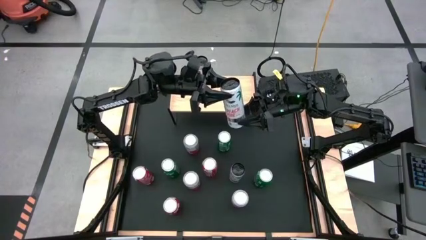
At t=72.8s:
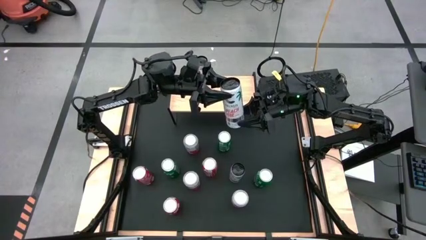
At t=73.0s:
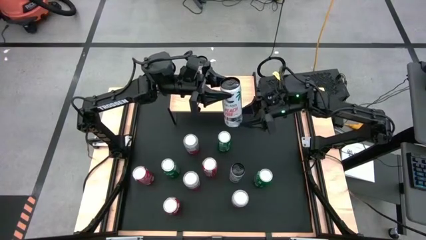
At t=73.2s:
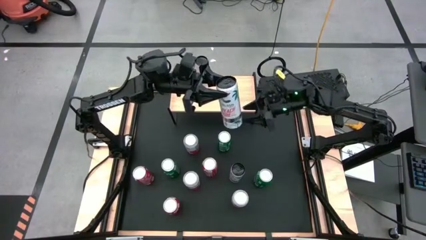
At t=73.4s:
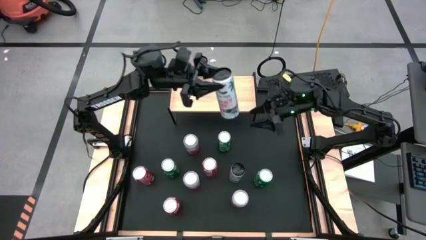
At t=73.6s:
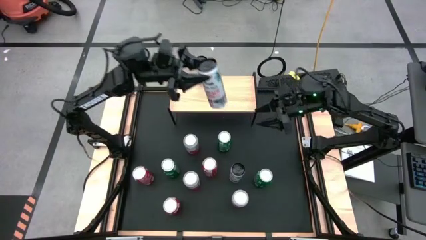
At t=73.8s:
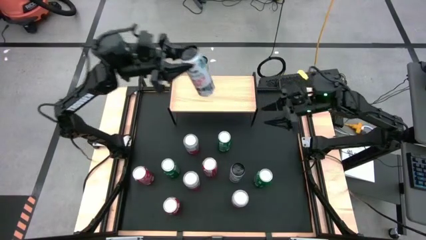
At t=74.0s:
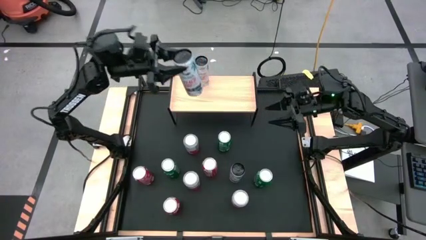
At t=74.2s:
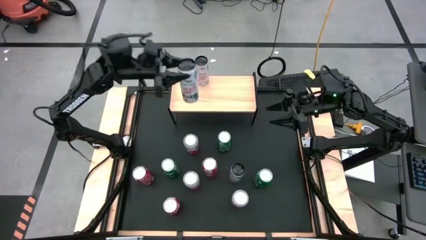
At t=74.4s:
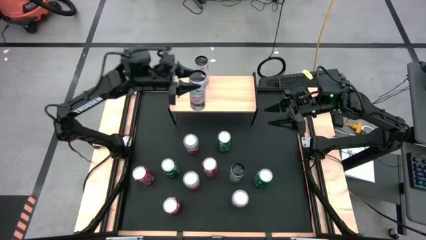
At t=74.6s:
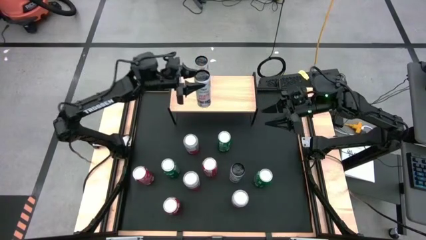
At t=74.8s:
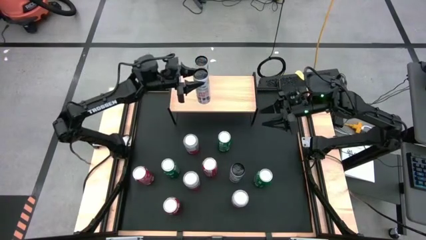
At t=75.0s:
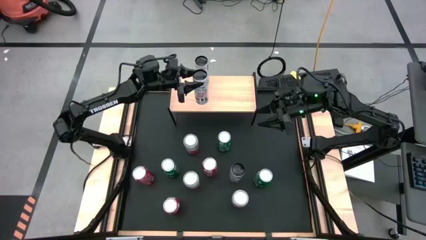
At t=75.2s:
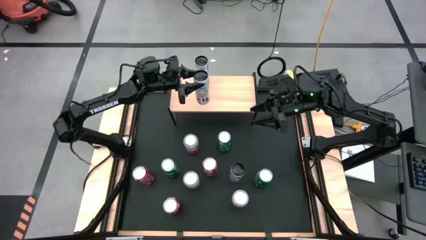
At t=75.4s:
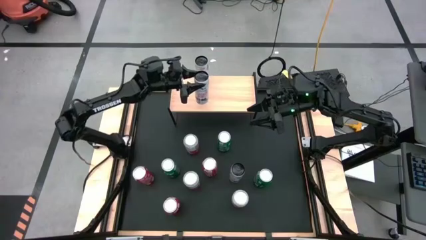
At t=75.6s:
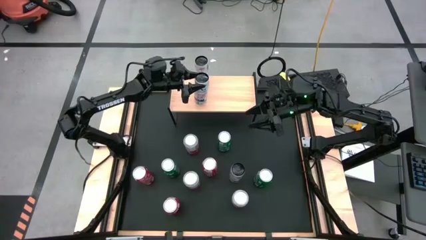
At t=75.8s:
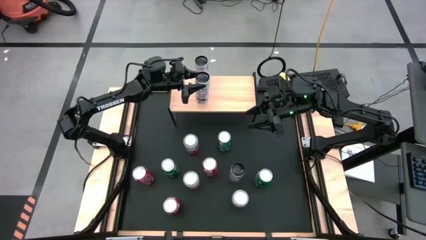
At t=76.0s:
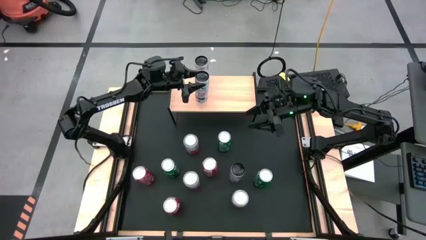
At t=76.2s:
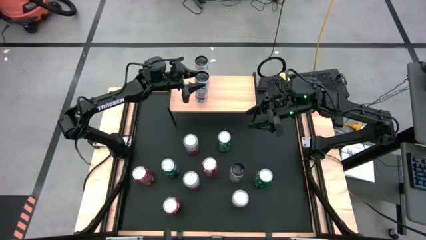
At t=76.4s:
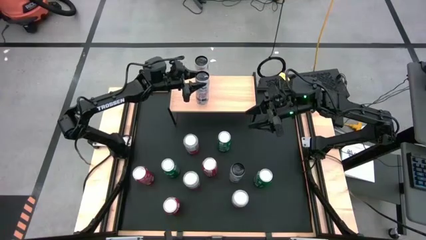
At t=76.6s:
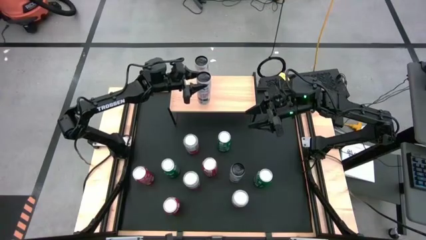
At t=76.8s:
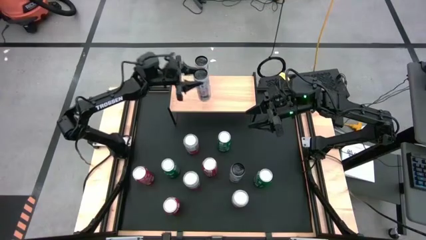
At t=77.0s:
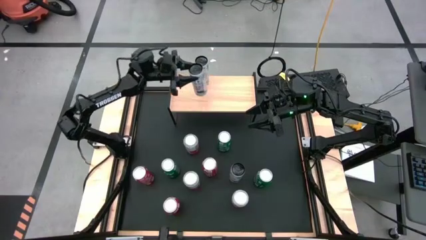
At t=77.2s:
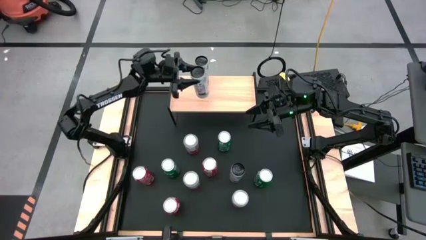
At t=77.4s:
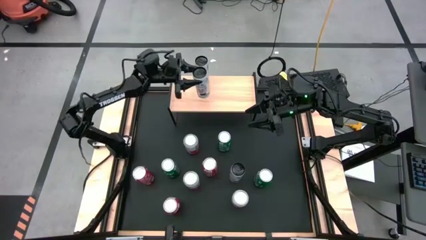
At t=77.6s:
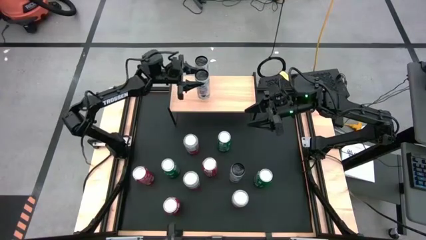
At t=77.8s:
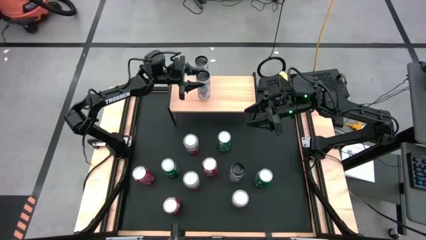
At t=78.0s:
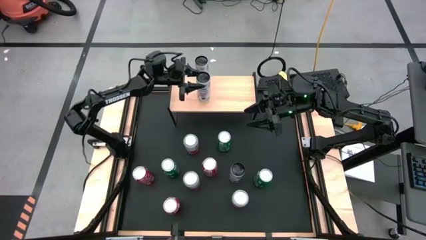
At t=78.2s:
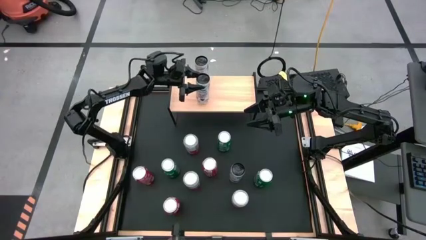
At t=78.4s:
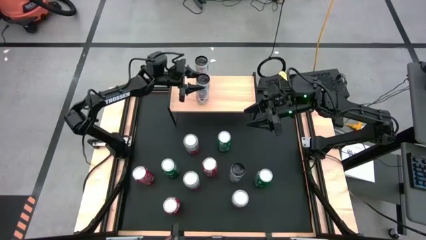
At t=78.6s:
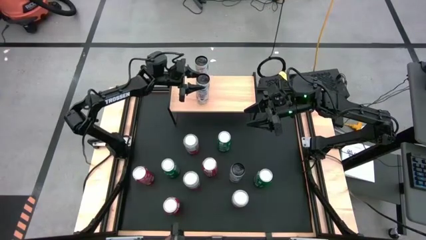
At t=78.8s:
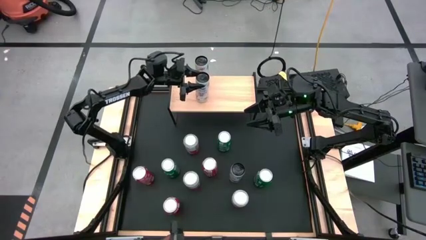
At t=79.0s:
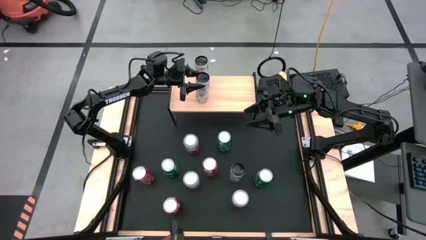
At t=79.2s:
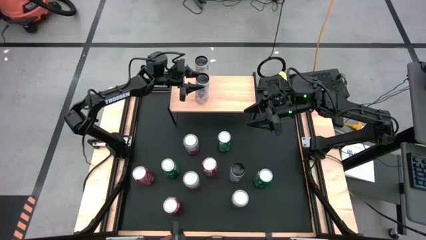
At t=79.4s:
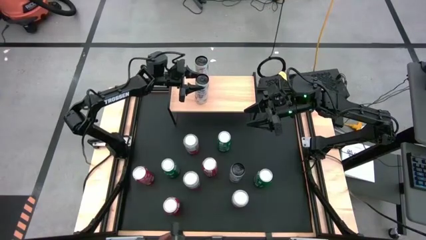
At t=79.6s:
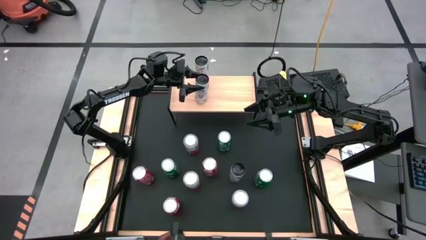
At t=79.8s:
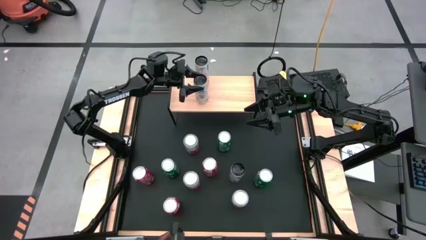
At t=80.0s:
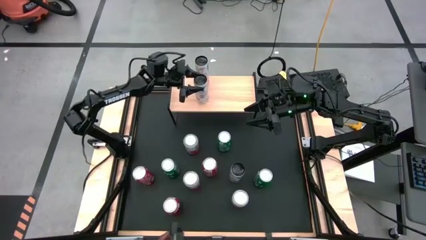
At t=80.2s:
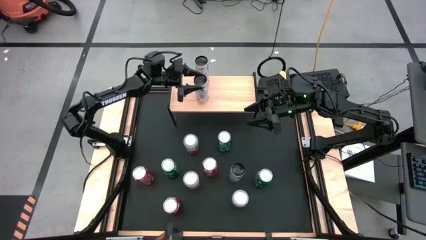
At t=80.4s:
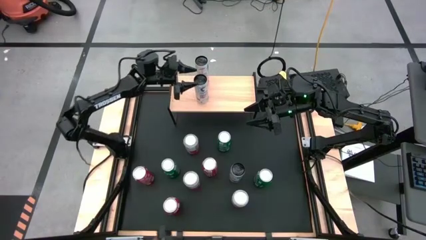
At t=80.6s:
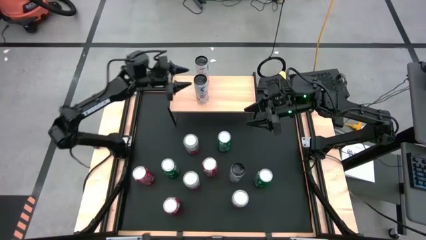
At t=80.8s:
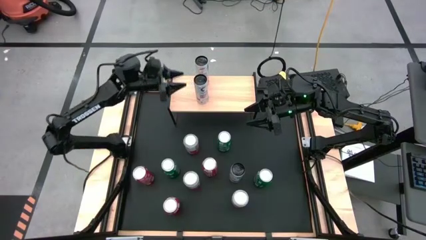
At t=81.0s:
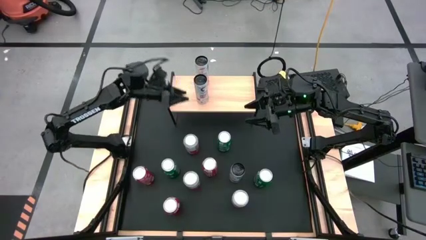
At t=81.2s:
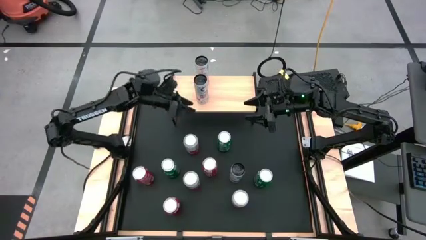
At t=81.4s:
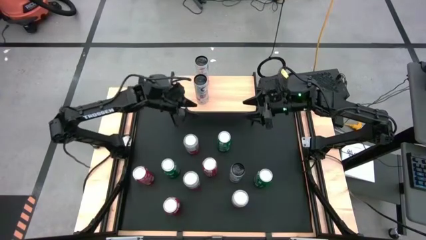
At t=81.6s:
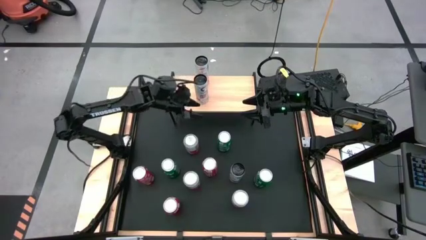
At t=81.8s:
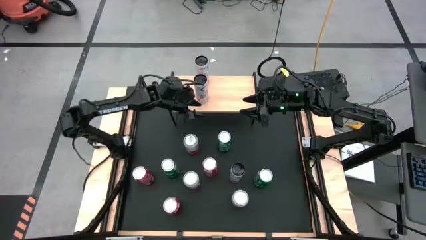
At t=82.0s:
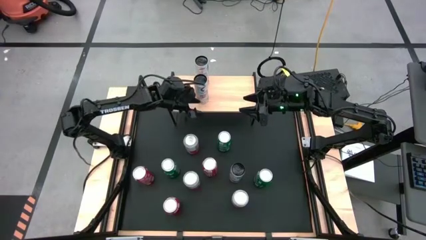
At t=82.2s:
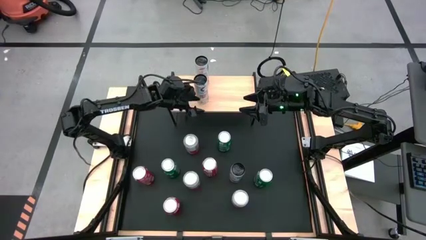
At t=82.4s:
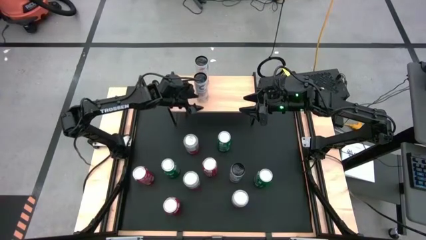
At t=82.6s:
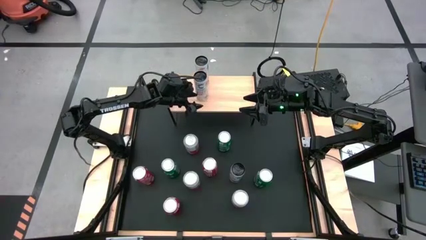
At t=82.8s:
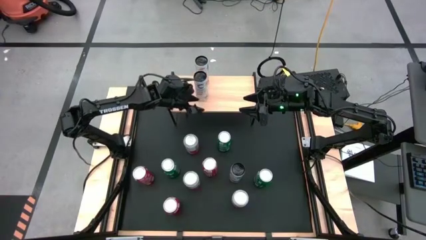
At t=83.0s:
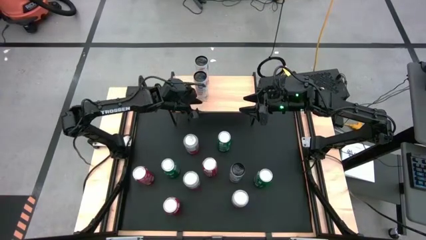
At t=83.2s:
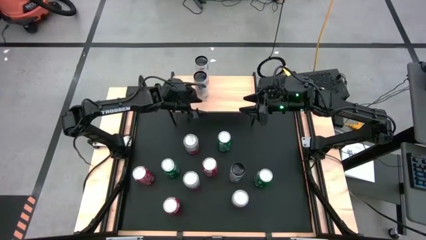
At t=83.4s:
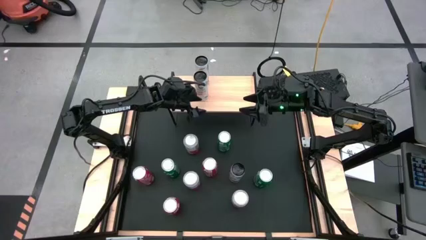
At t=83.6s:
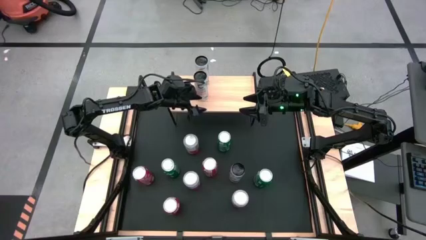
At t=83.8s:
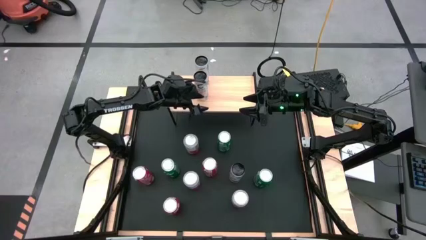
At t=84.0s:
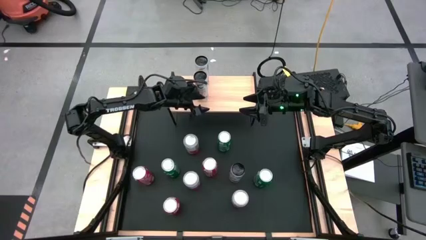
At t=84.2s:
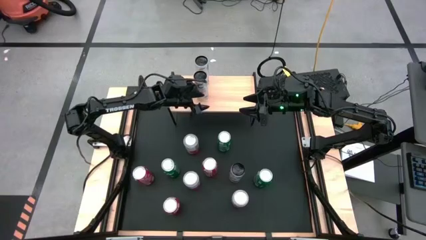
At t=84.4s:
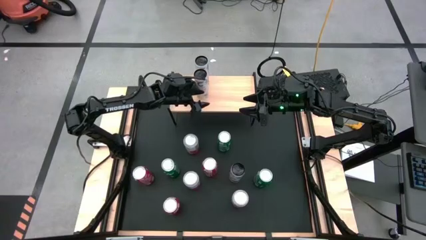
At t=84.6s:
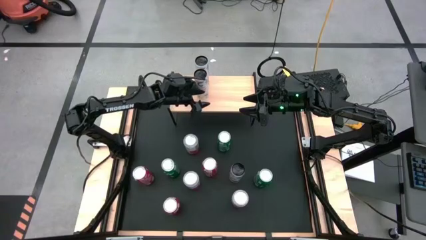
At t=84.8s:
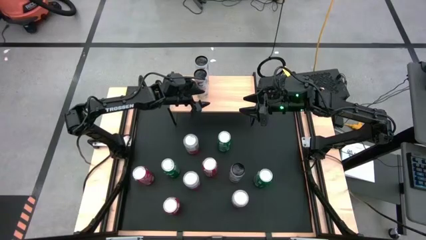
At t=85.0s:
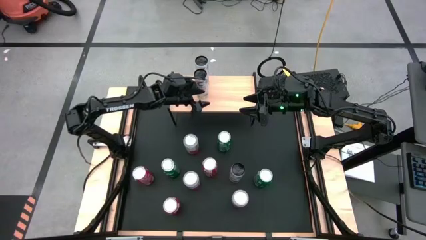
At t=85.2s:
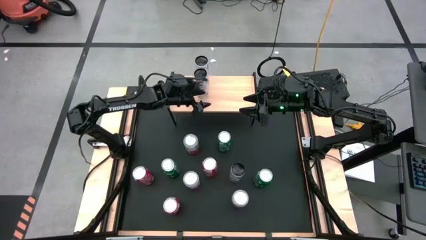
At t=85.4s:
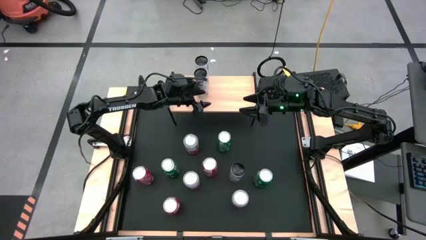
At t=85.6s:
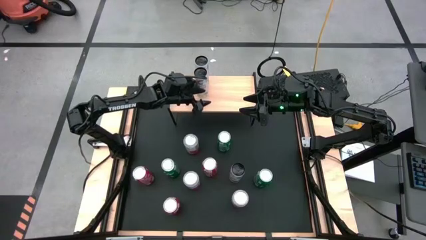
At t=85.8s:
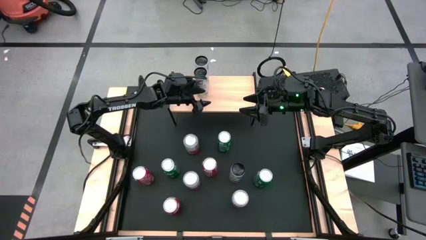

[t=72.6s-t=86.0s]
Task: Place canned beverage on shelf
Put the top white pink soda can aligned with the other white pink soda can on the shelf
